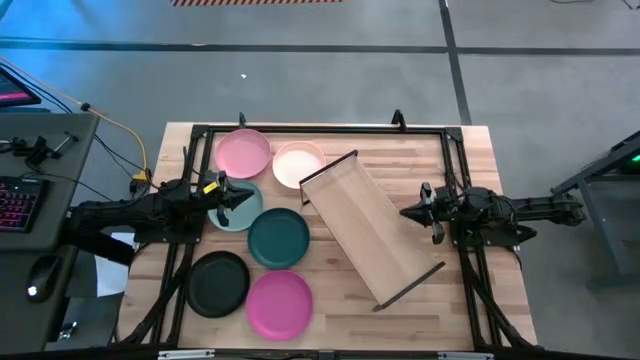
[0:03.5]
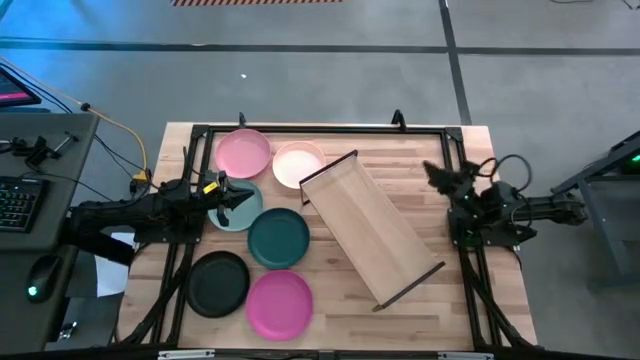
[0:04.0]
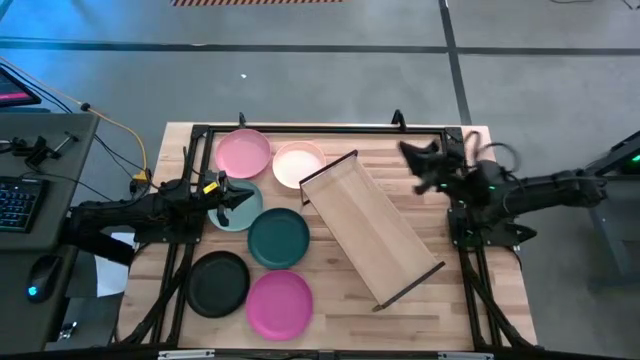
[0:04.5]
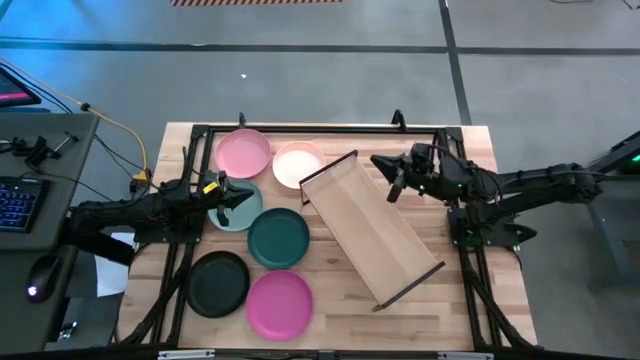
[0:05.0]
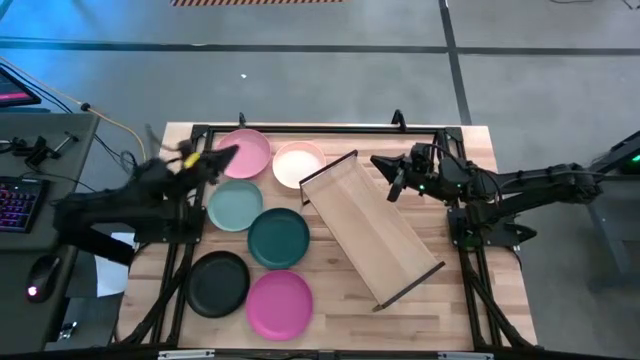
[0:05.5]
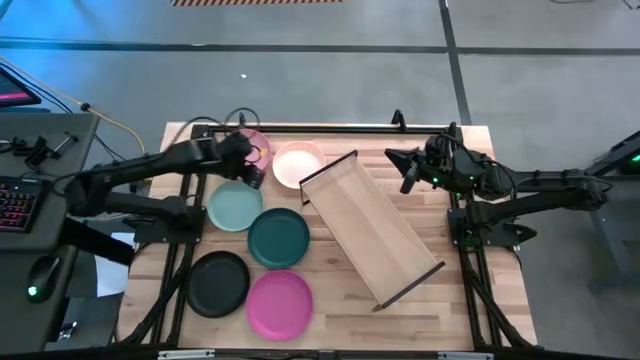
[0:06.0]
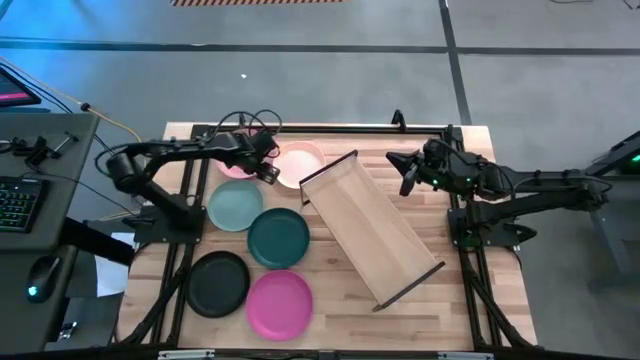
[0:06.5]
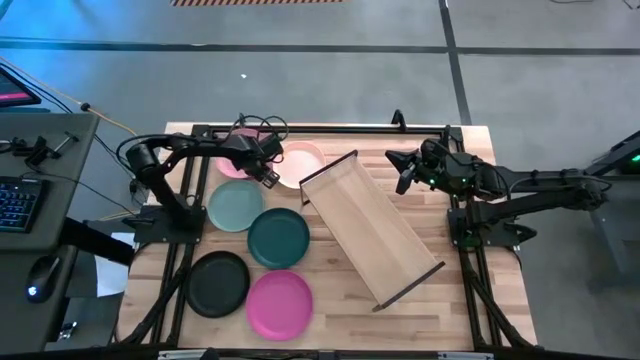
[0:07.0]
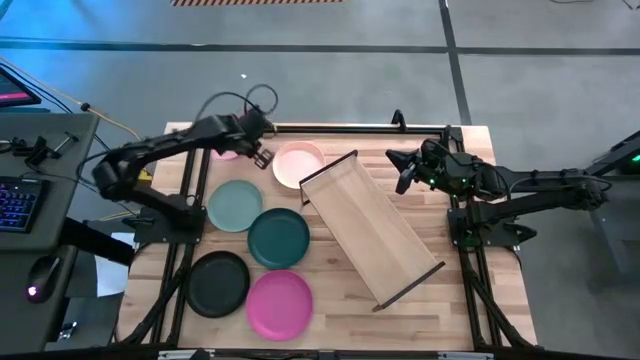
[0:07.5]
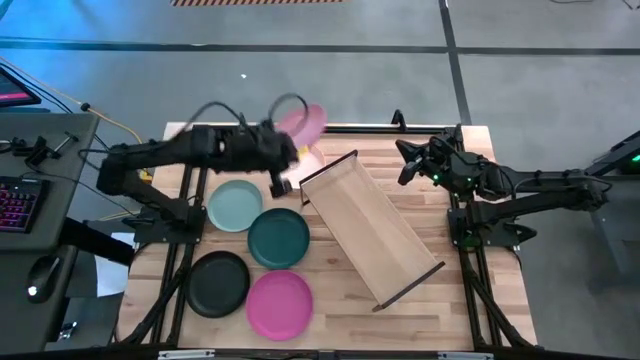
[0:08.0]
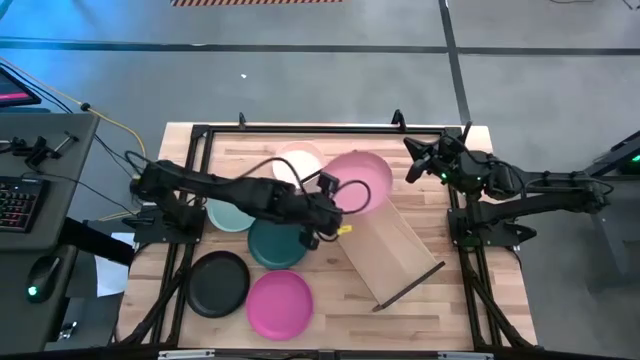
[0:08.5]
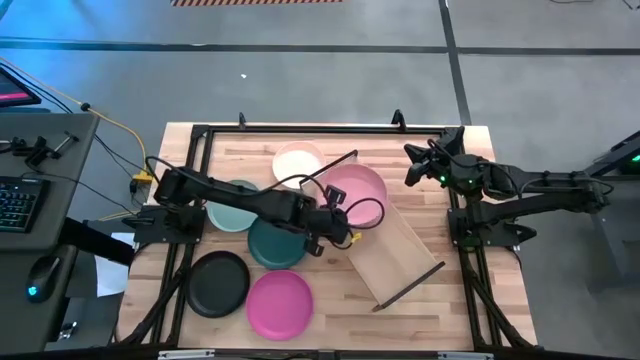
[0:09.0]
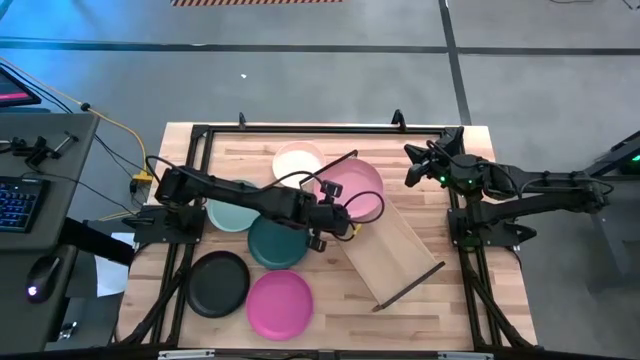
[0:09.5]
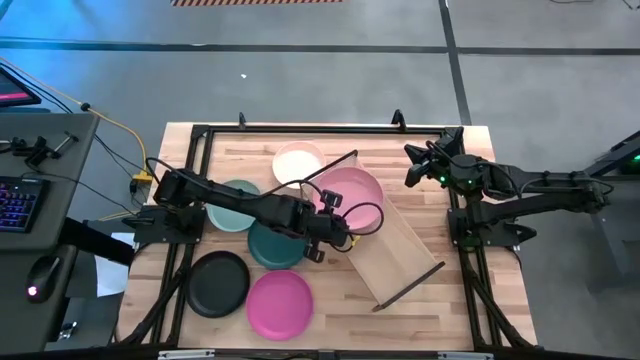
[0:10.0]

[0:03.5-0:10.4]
Task: Place and stack plates onto a shelf
Put the pink plate on the shelf

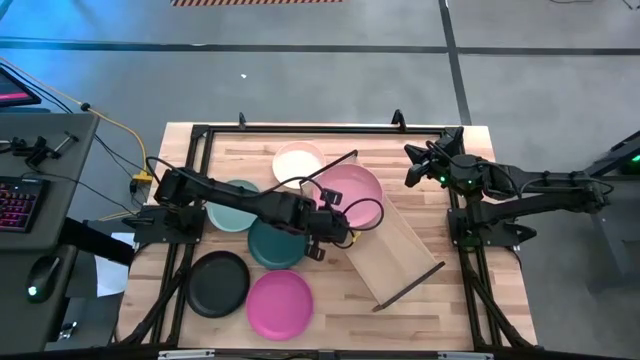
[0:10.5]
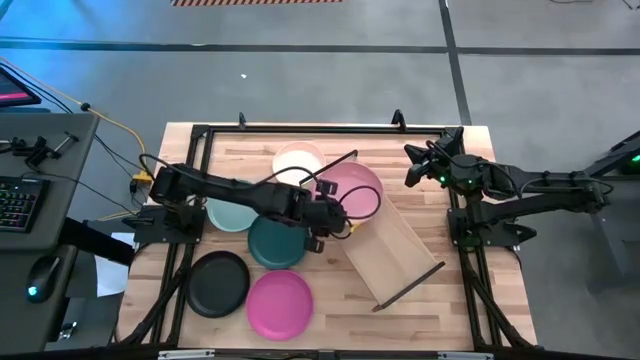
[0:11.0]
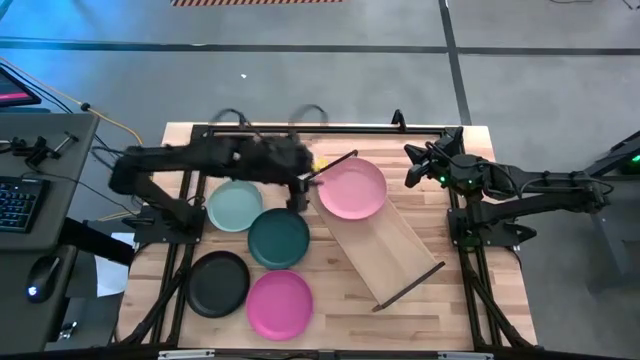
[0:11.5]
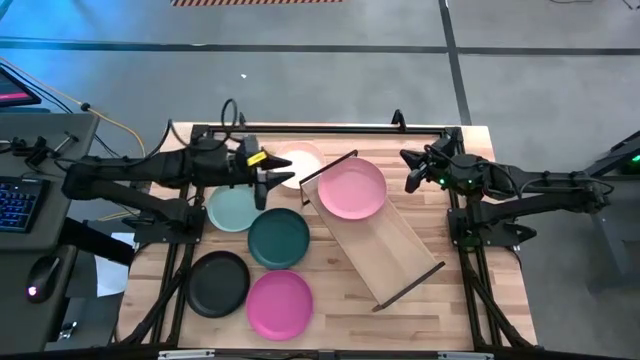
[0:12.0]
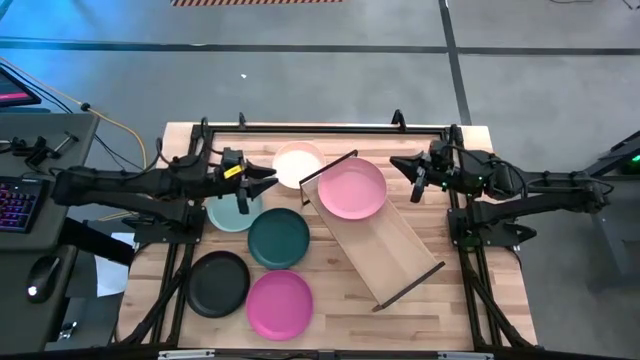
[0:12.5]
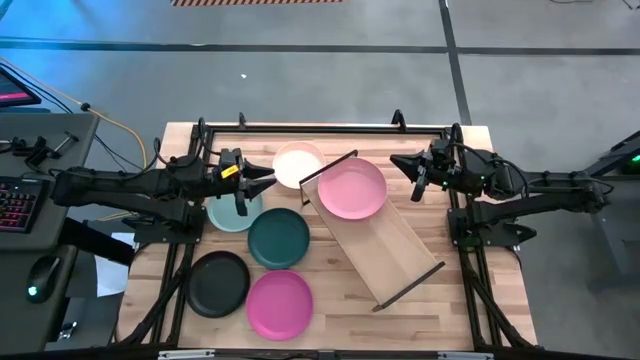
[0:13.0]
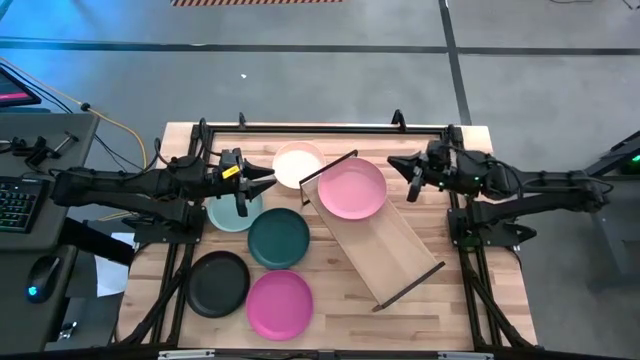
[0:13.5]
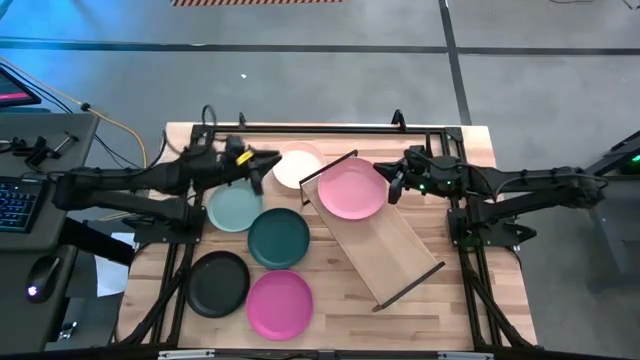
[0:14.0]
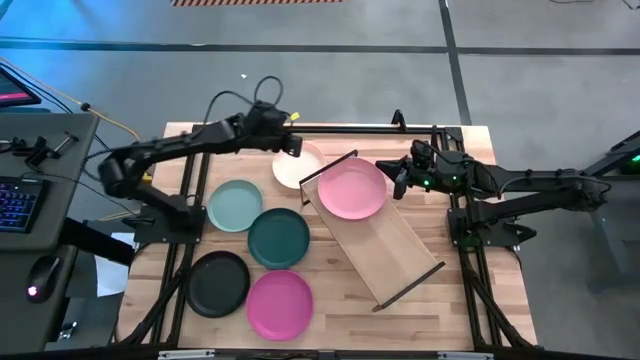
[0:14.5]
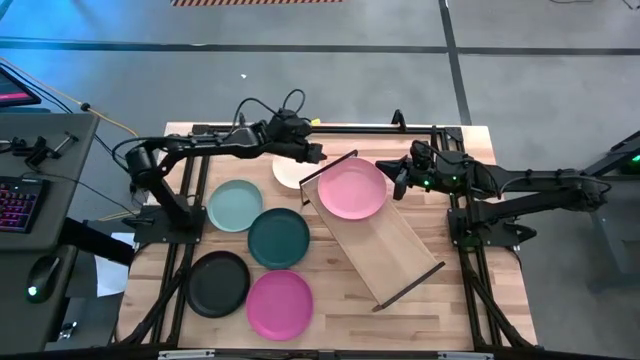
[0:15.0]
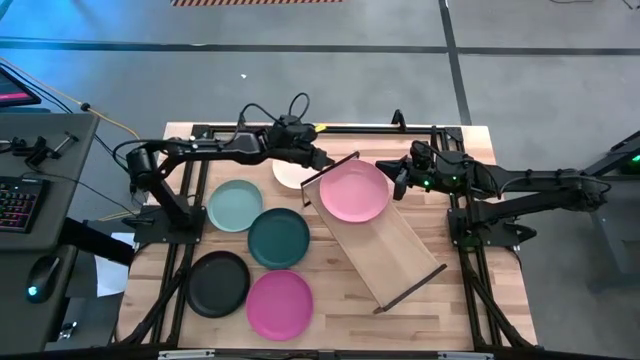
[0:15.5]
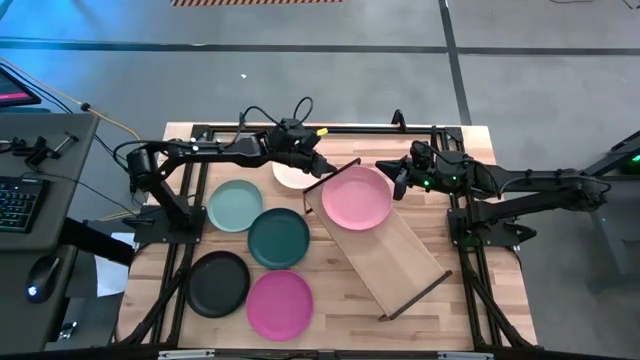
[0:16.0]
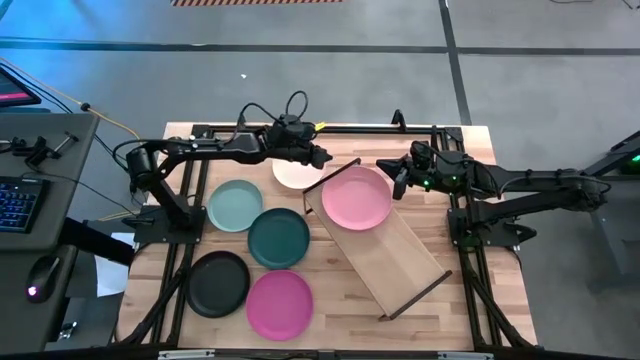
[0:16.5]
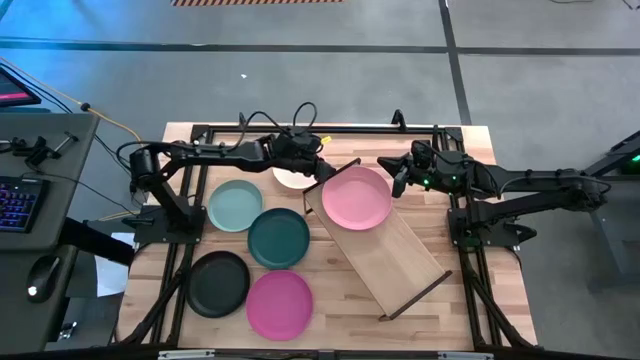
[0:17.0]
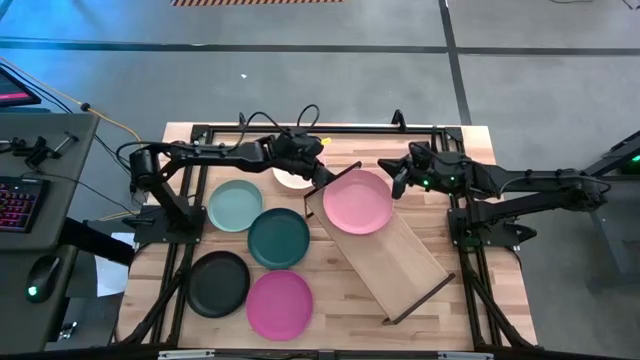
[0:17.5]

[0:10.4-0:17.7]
Adjust the shelf

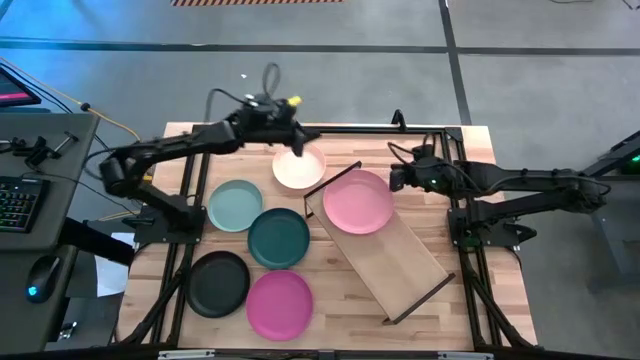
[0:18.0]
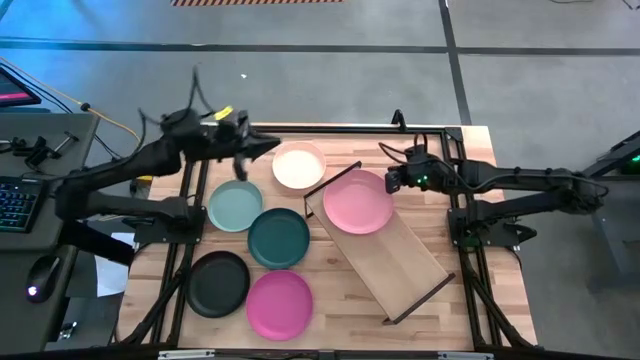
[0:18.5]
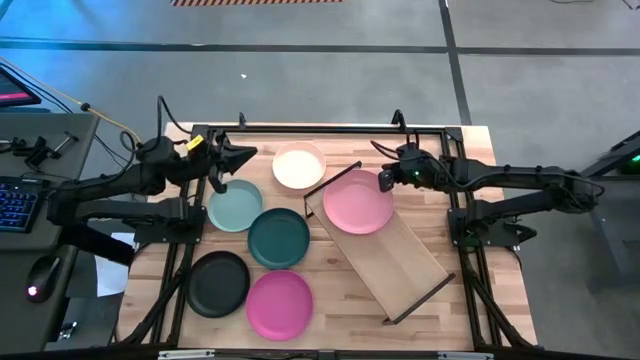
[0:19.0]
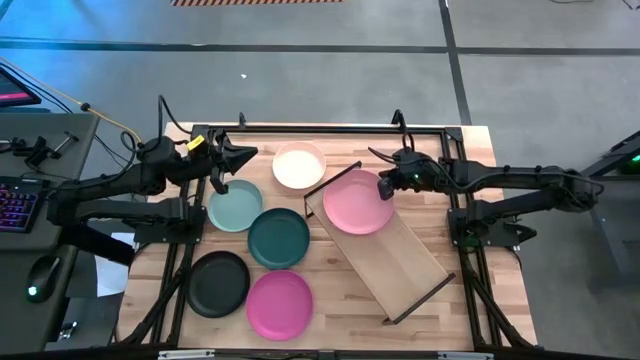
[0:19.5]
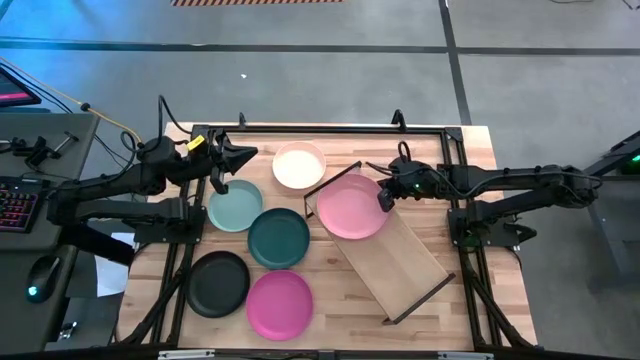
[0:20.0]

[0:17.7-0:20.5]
Adjust the pink plate

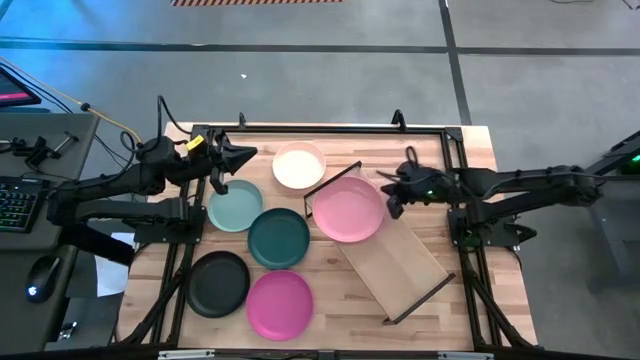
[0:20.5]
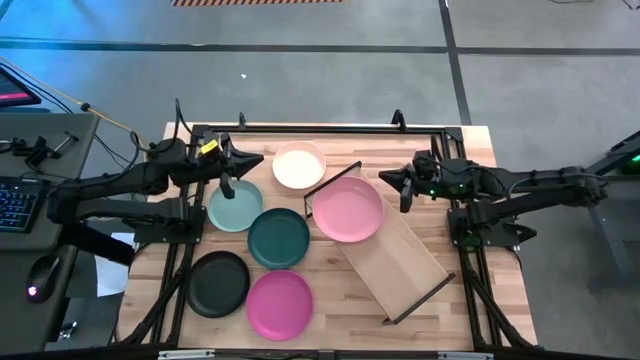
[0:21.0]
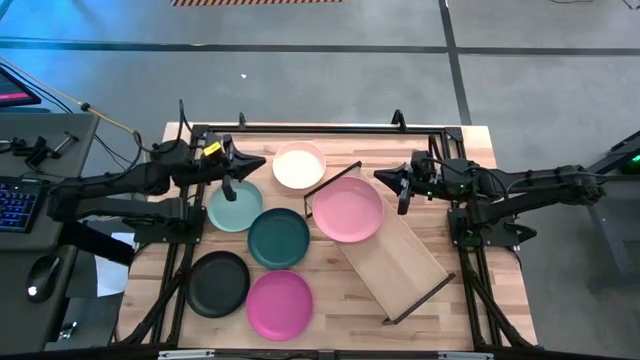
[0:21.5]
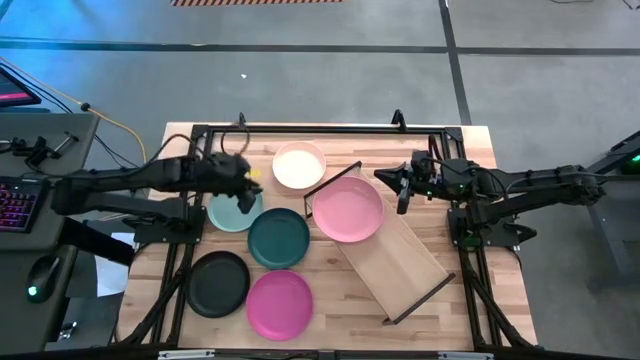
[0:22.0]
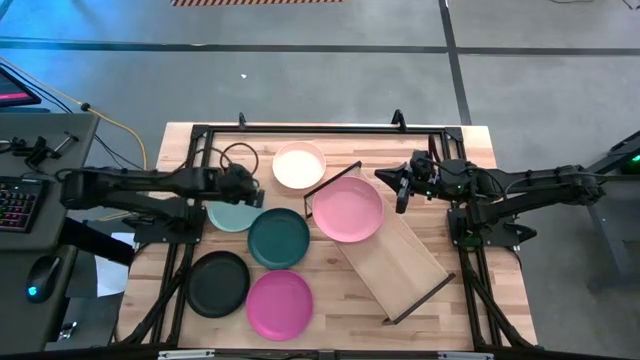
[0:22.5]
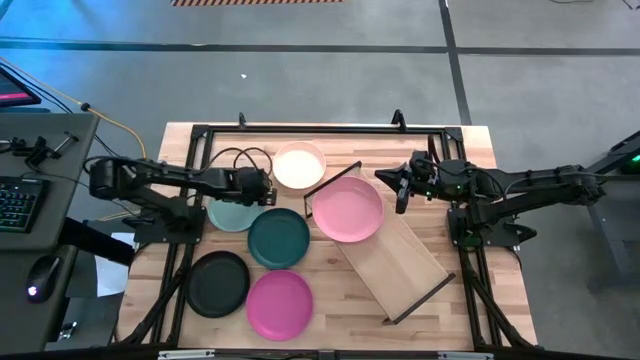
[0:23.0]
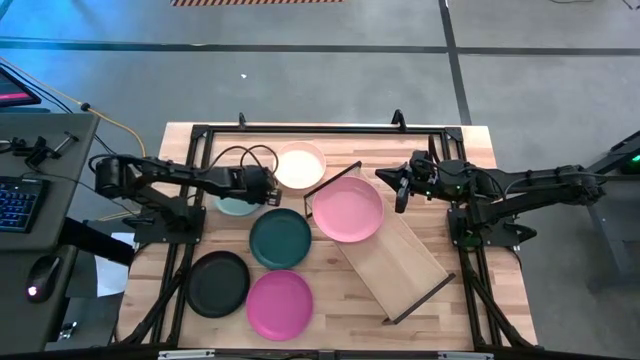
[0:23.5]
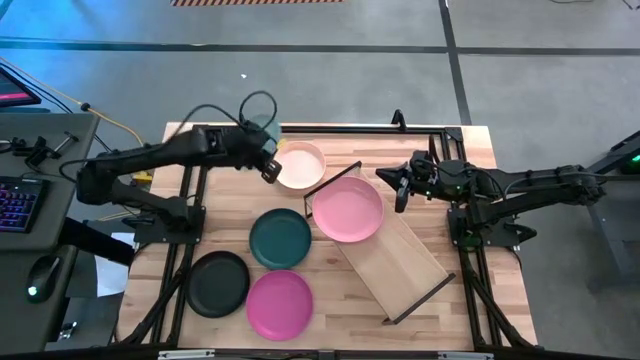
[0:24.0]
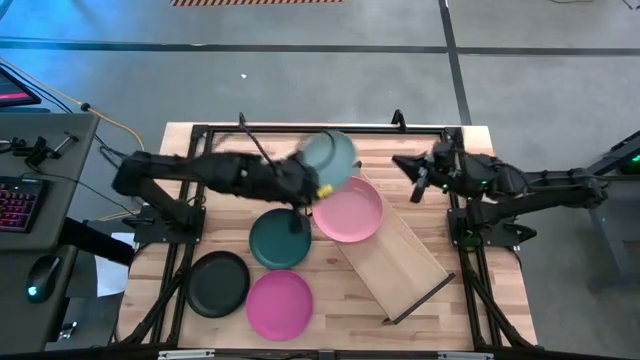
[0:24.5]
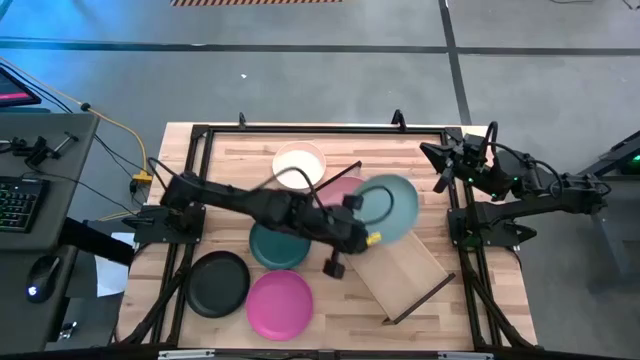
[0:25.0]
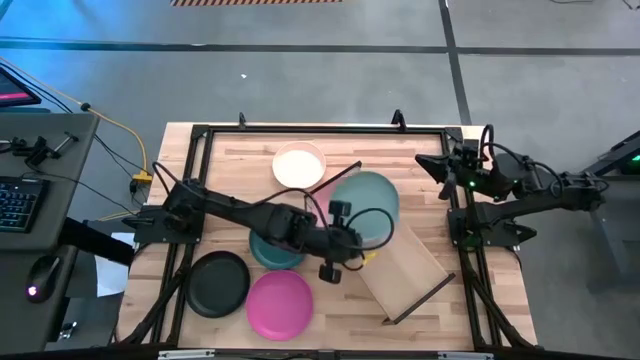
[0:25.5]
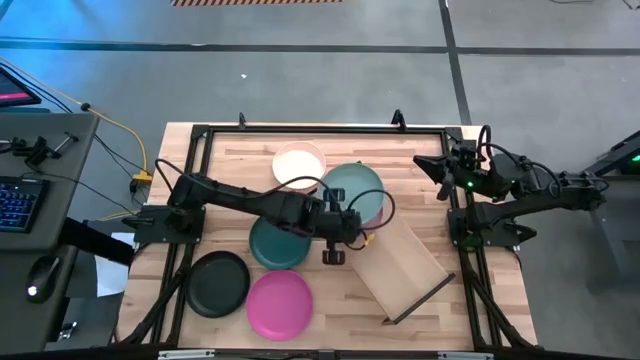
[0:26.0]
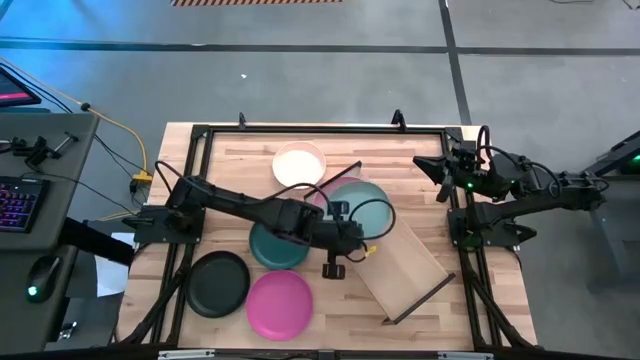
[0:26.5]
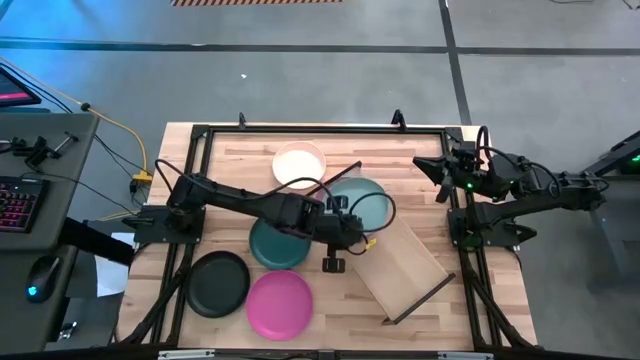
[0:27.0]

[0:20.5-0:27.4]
Stack the blue plate on the pink plate
